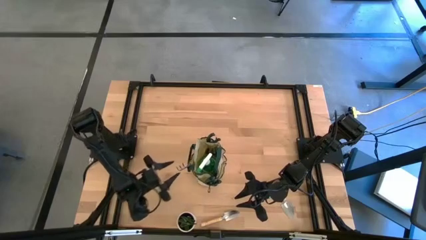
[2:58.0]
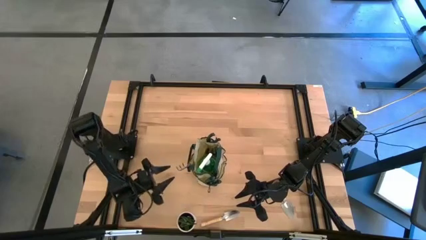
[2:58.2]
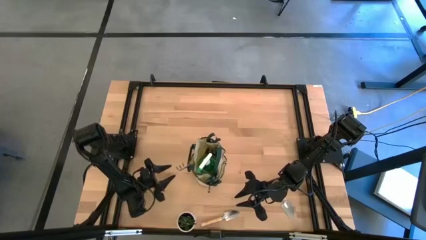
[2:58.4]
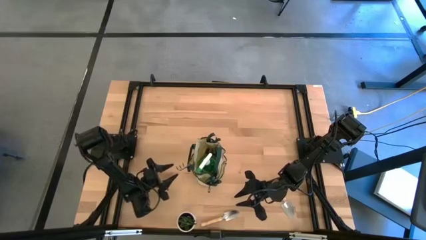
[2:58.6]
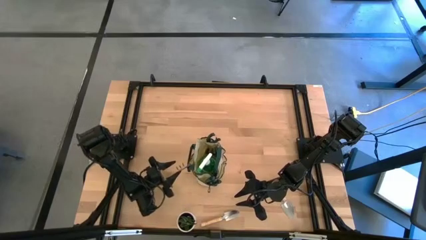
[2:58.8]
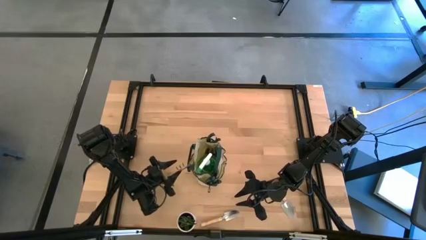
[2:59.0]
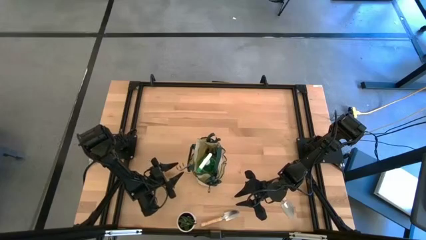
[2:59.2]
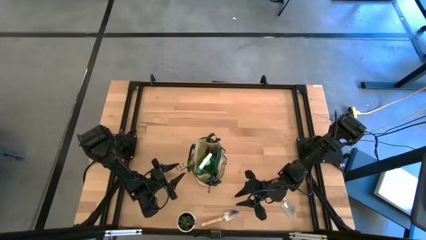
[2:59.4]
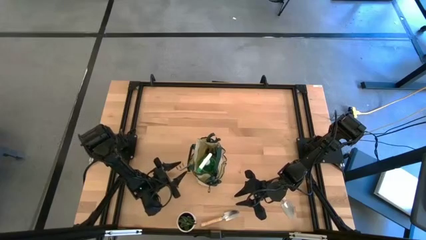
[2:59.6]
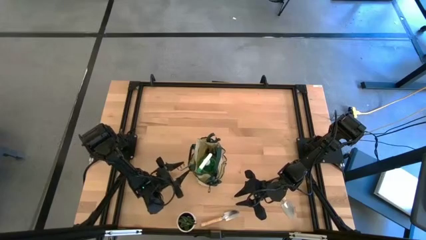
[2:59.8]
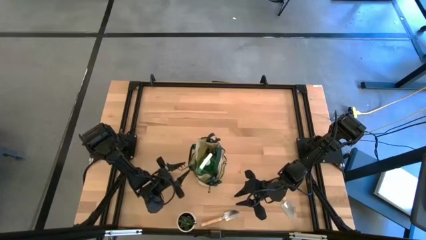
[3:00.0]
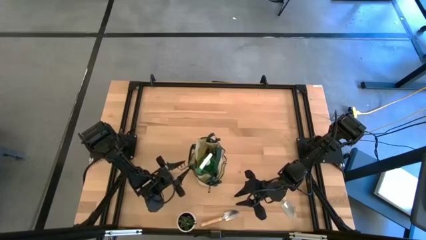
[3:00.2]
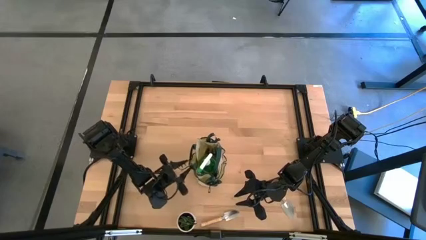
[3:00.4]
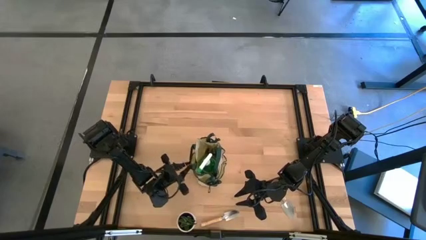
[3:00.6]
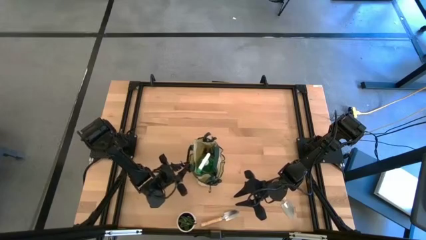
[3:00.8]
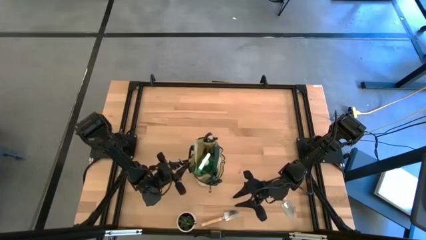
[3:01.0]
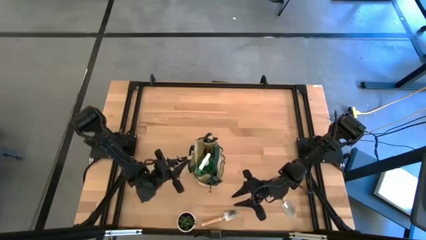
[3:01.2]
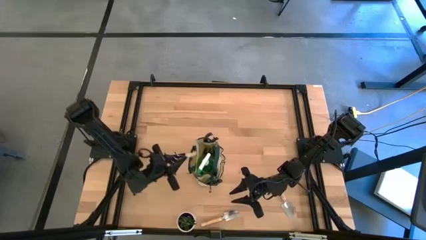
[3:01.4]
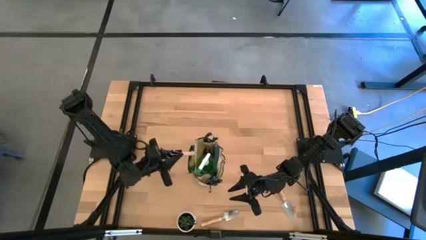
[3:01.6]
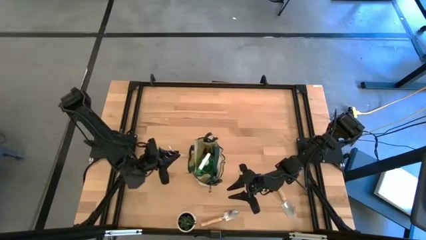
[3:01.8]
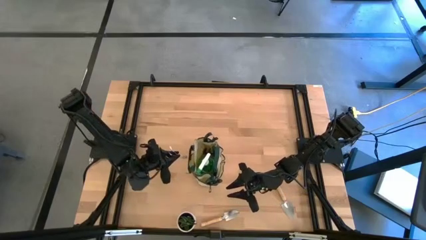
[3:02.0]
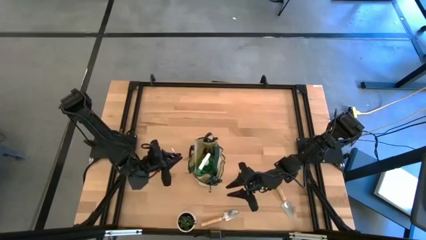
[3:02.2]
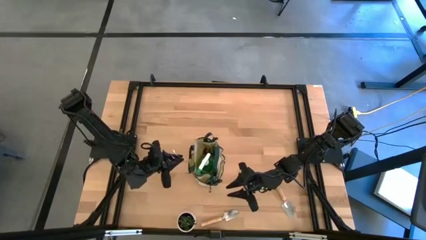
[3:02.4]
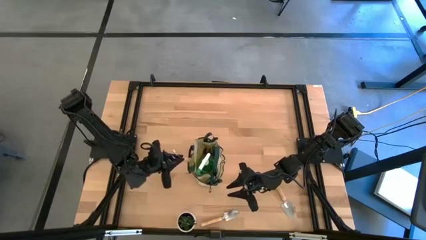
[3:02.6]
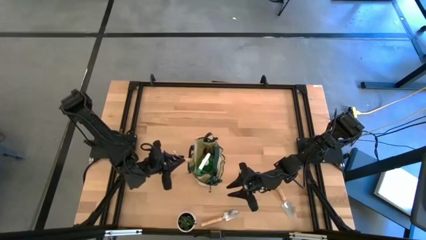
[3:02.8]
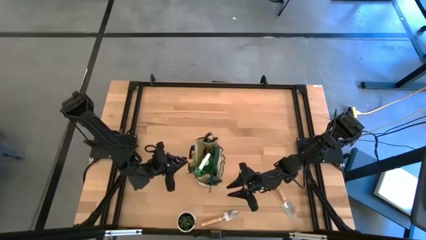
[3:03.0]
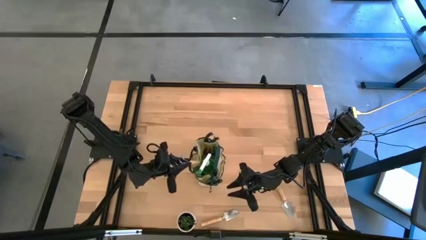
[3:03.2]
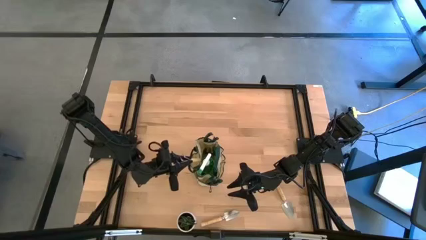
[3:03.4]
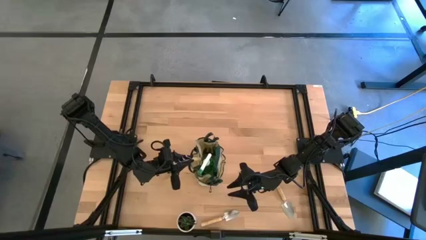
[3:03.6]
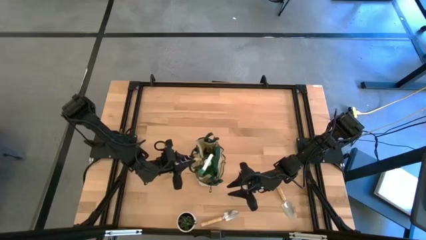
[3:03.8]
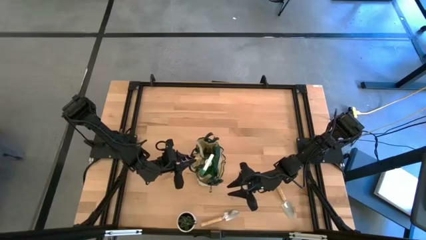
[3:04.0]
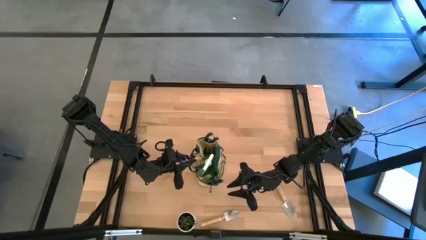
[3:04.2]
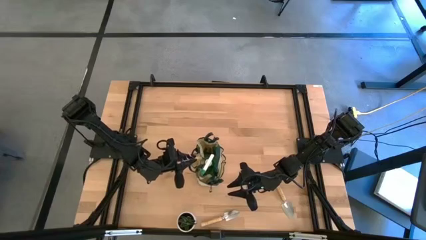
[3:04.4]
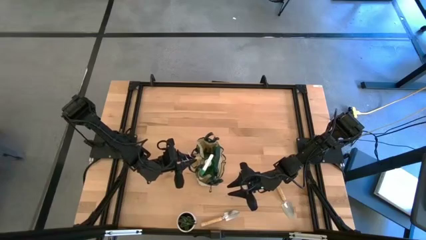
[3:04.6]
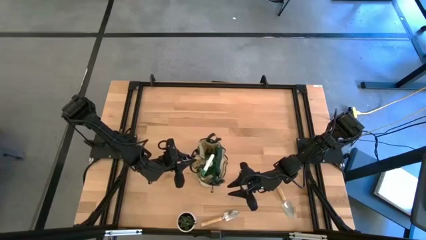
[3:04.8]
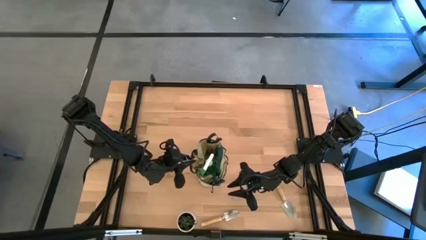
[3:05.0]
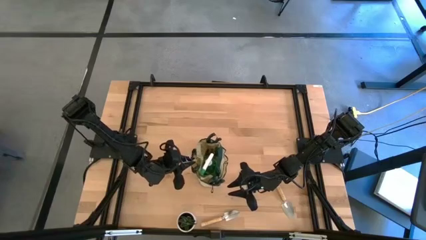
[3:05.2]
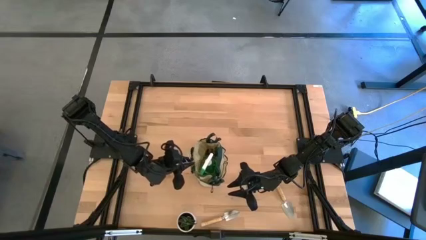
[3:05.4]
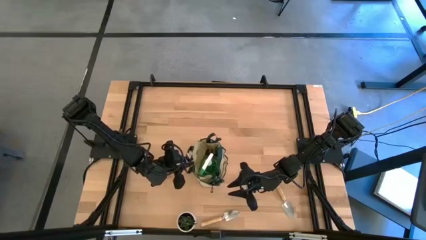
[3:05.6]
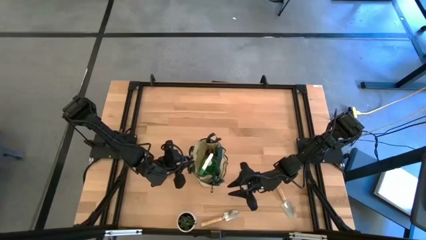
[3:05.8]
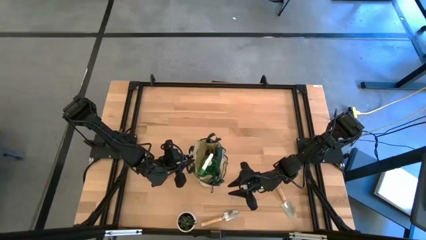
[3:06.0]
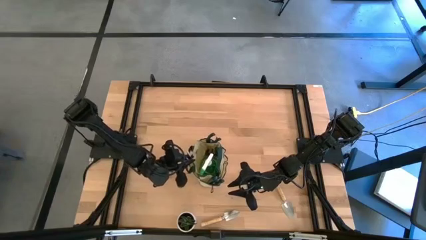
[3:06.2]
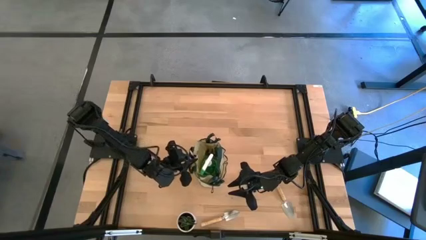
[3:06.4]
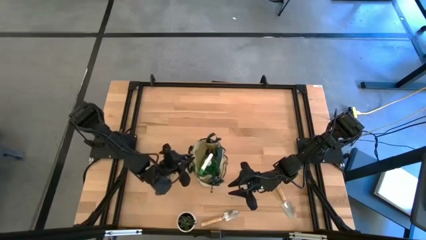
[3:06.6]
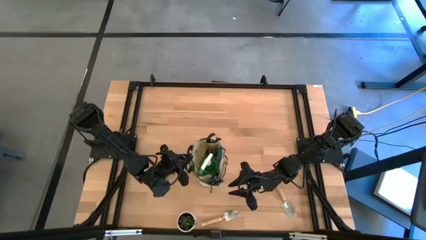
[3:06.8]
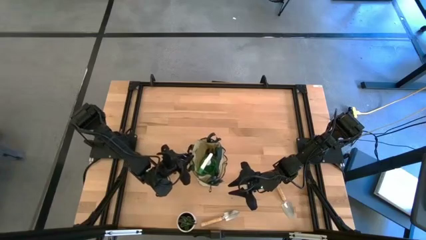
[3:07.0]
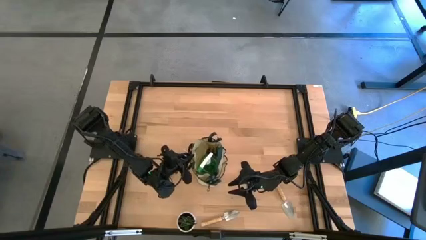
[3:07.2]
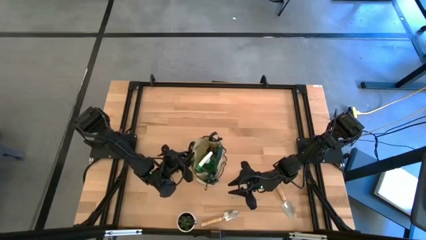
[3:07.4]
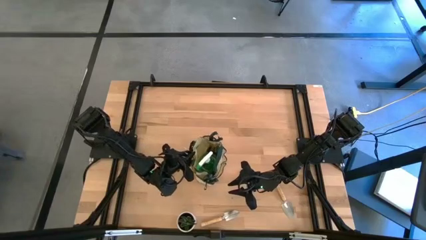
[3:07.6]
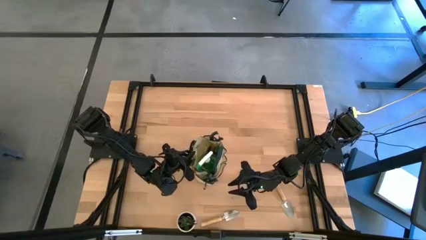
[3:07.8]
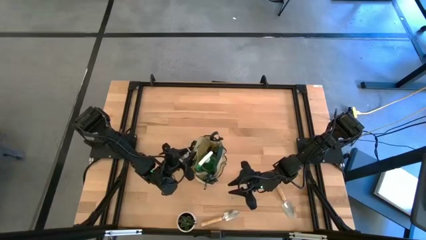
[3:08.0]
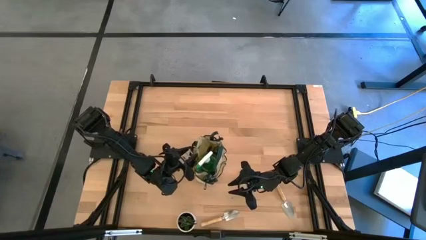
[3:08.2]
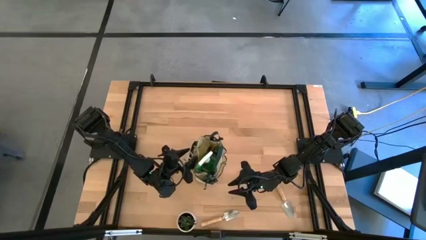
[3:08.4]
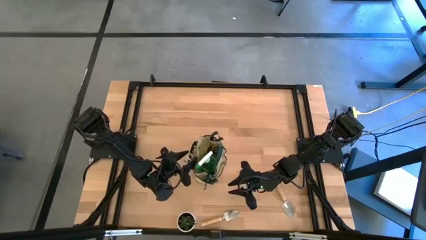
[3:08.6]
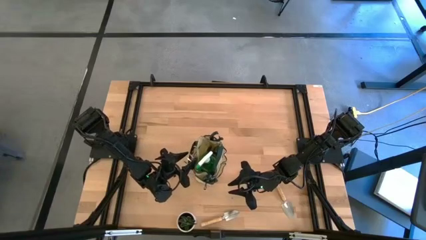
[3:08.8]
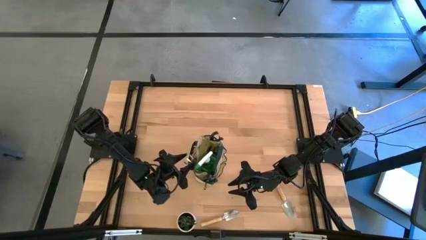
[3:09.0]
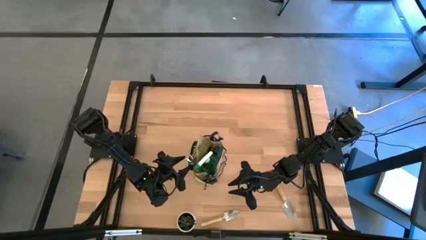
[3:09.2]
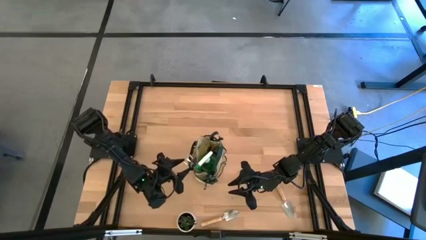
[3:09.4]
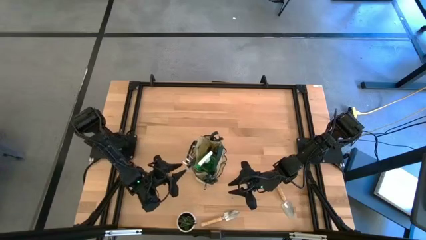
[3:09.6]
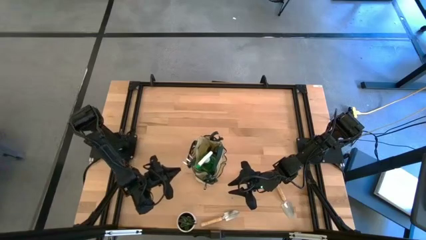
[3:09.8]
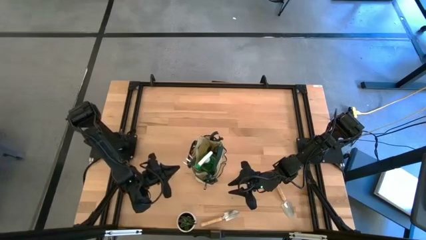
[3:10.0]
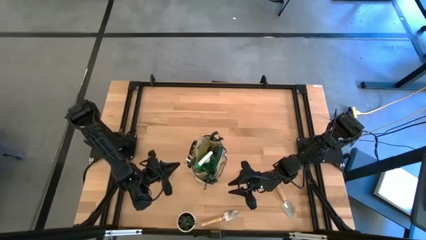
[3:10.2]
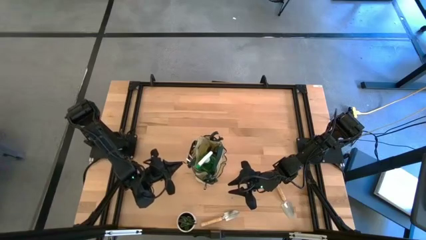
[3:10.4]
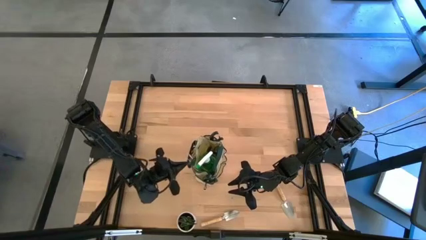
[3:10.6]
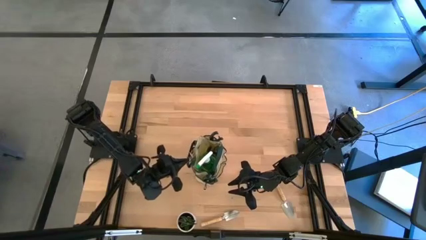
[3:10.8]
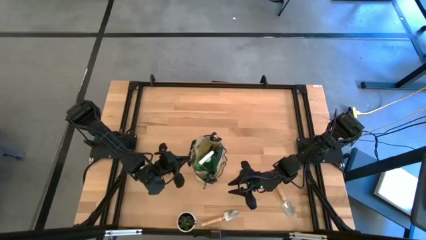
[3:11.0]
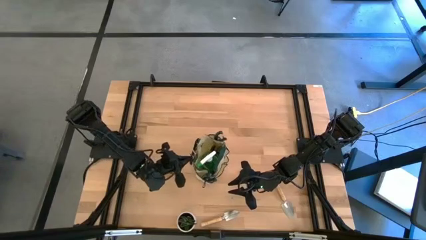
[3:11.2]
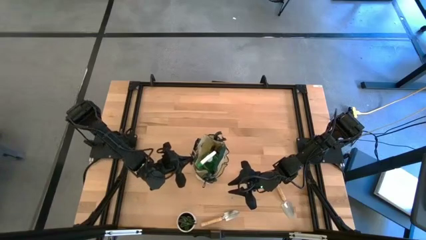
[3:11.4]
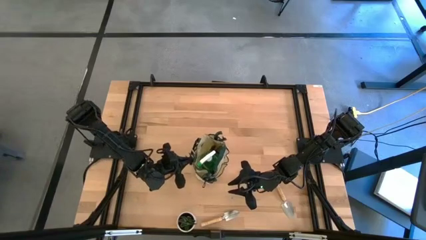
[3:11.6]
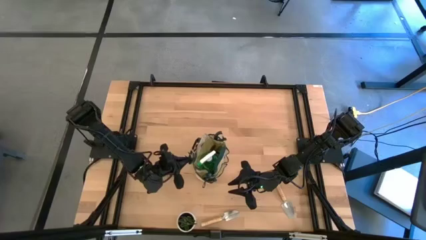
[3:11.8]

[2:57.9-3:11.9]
Task: Pick & Place Garden tools in Gardening bag
Adjust the brown hand rake in the side pocket of the green gardening bag
